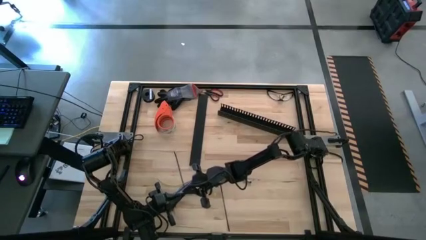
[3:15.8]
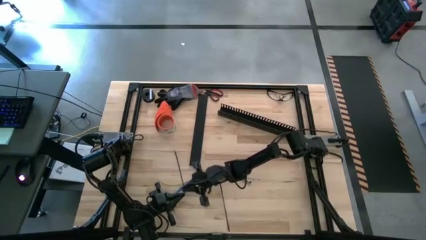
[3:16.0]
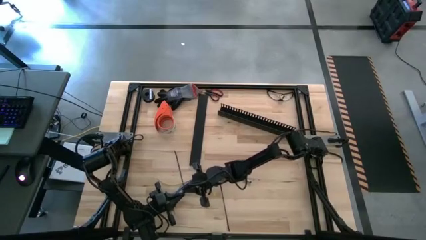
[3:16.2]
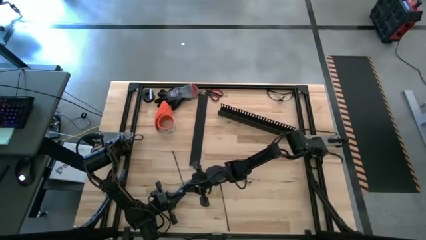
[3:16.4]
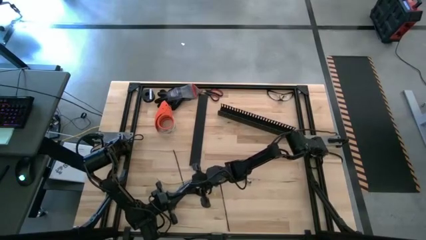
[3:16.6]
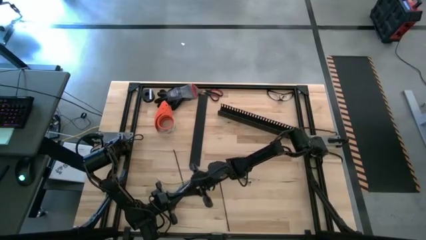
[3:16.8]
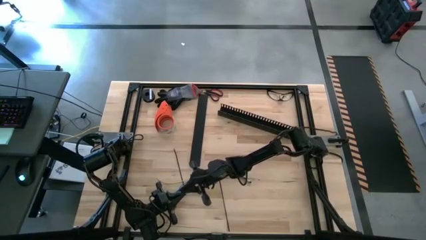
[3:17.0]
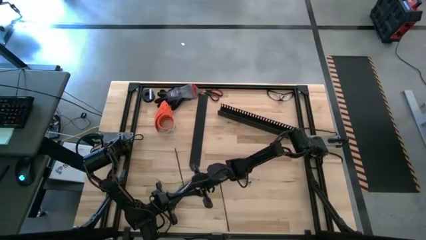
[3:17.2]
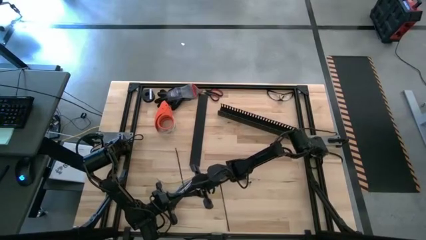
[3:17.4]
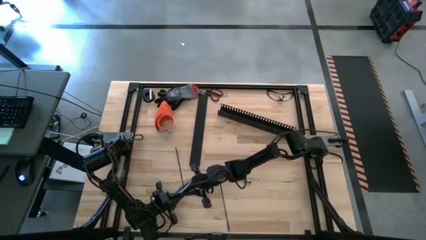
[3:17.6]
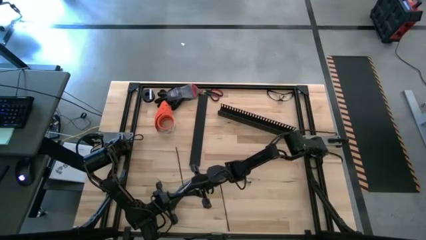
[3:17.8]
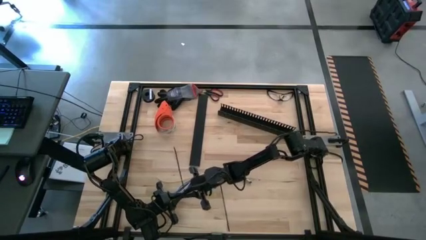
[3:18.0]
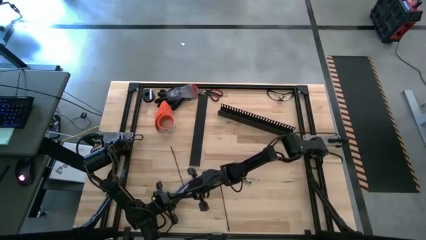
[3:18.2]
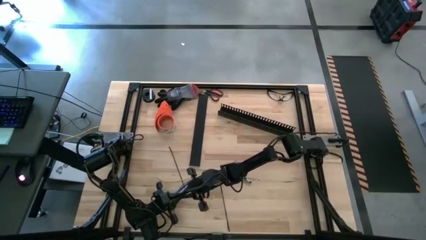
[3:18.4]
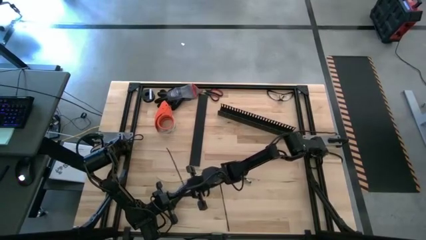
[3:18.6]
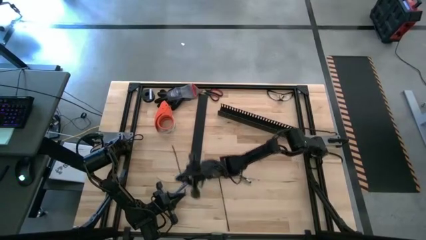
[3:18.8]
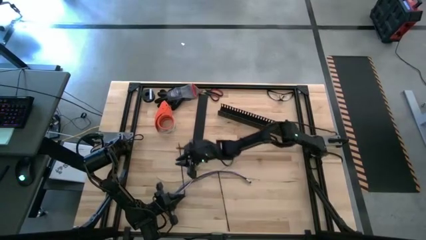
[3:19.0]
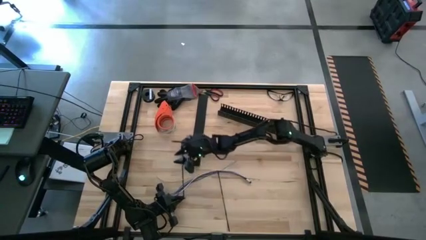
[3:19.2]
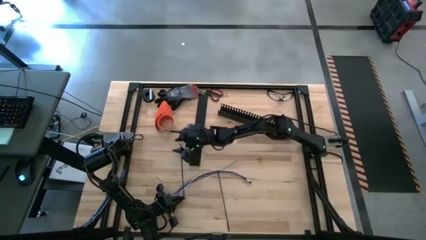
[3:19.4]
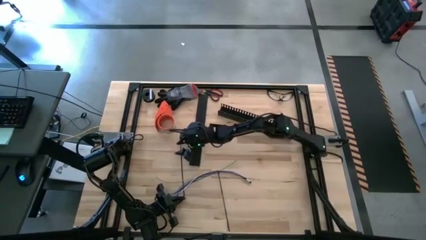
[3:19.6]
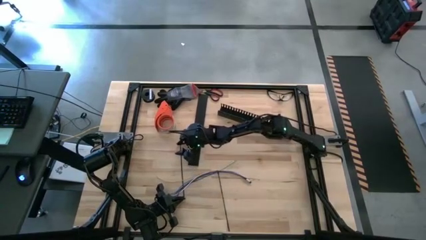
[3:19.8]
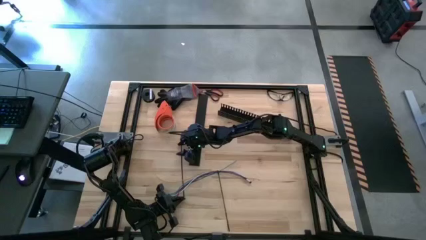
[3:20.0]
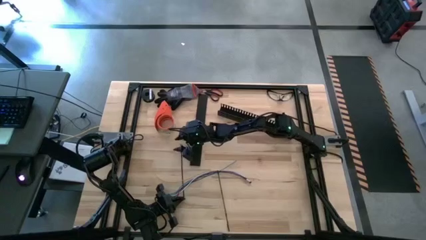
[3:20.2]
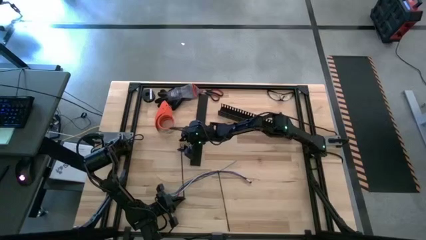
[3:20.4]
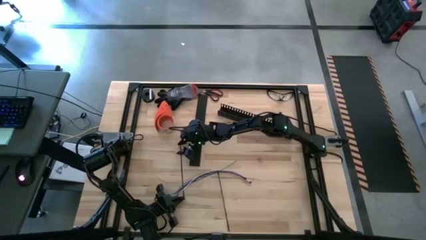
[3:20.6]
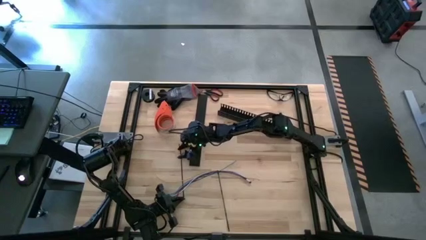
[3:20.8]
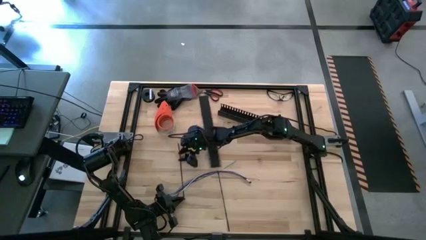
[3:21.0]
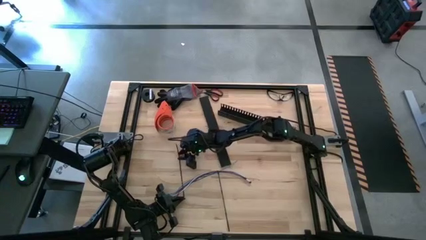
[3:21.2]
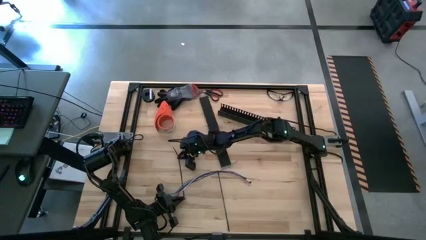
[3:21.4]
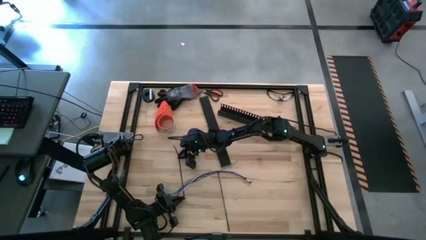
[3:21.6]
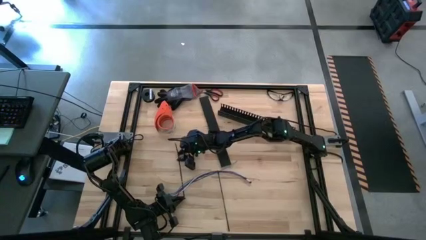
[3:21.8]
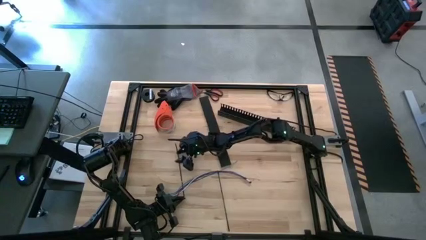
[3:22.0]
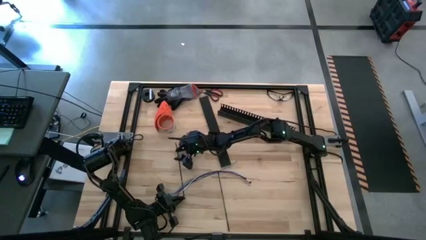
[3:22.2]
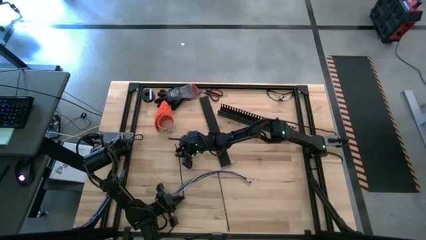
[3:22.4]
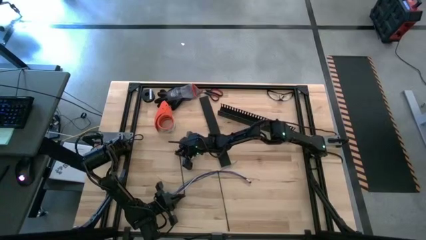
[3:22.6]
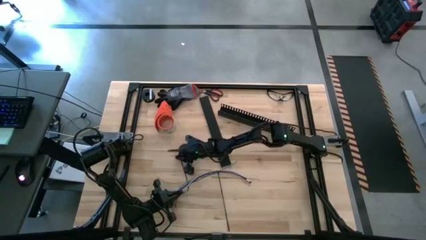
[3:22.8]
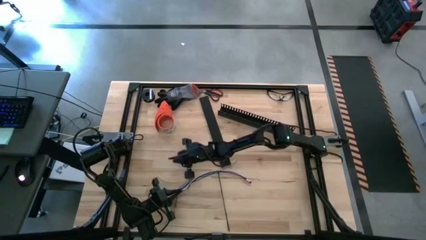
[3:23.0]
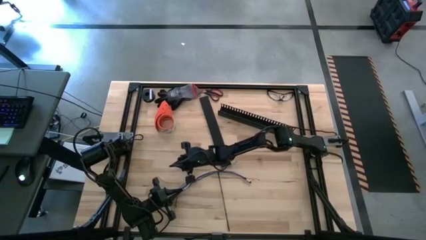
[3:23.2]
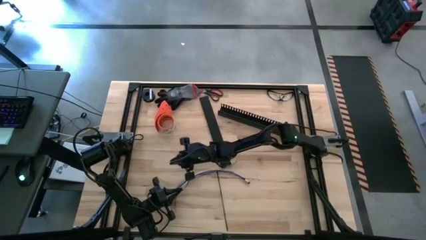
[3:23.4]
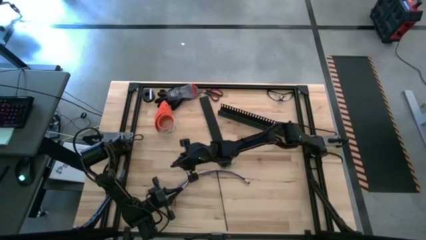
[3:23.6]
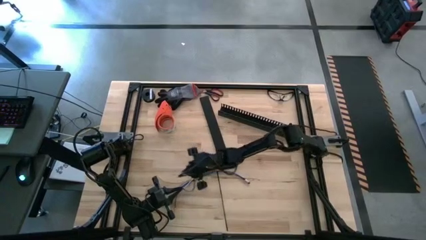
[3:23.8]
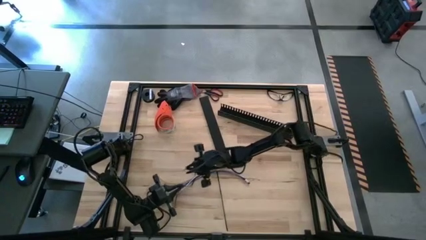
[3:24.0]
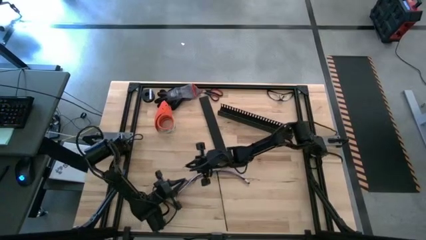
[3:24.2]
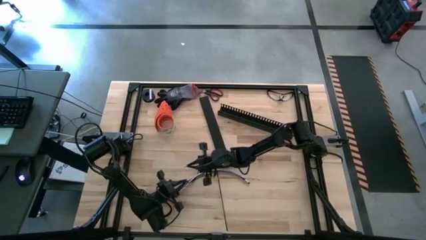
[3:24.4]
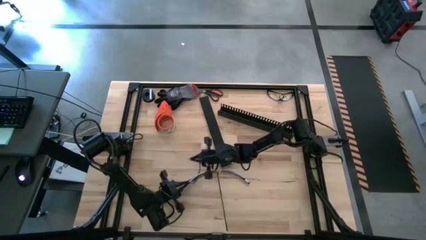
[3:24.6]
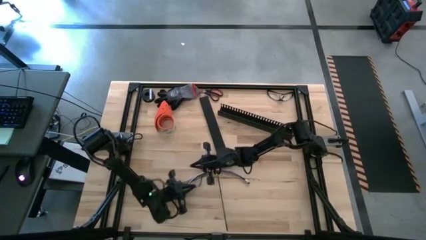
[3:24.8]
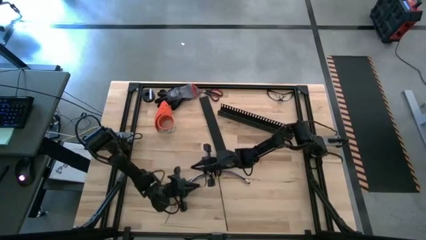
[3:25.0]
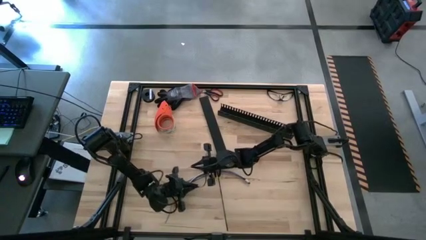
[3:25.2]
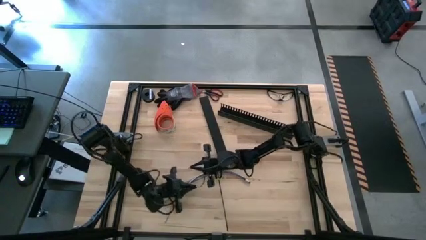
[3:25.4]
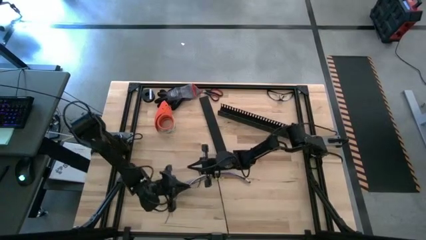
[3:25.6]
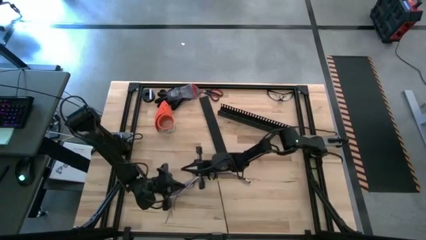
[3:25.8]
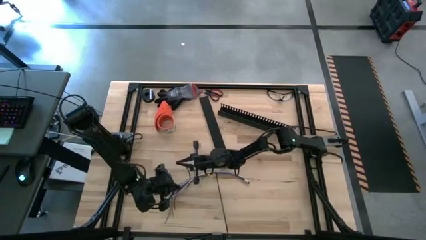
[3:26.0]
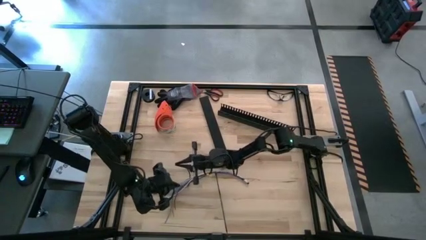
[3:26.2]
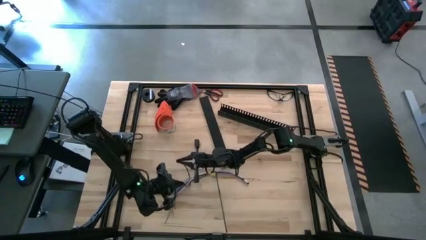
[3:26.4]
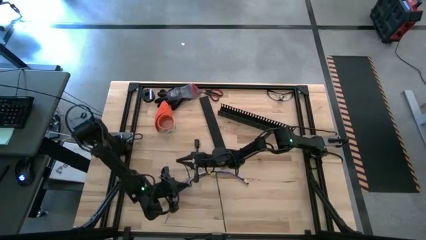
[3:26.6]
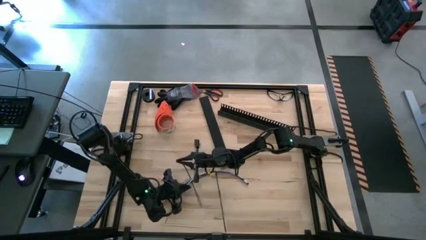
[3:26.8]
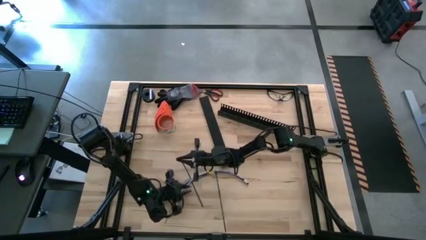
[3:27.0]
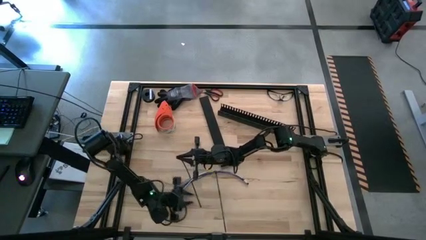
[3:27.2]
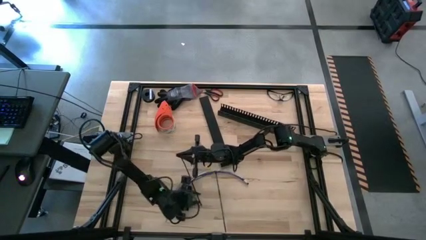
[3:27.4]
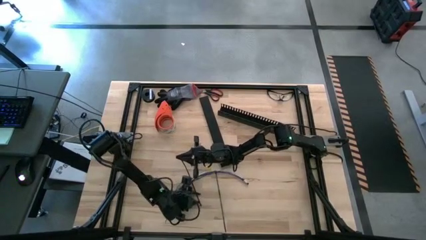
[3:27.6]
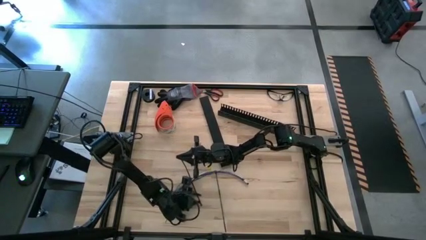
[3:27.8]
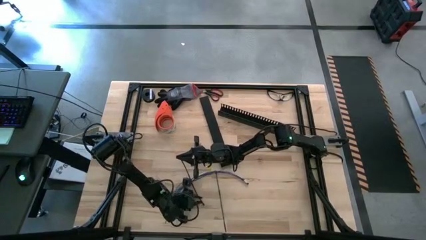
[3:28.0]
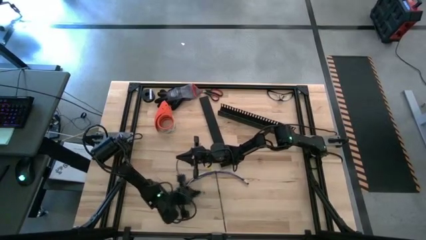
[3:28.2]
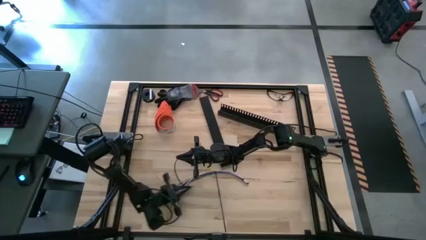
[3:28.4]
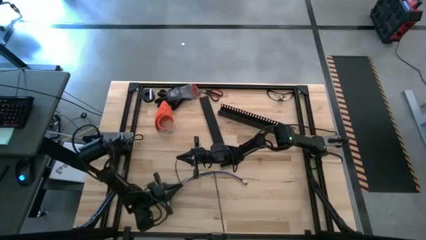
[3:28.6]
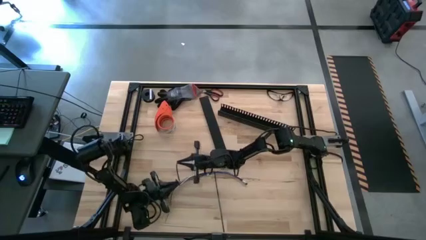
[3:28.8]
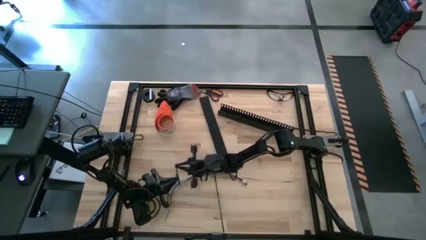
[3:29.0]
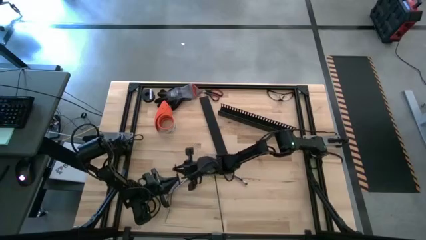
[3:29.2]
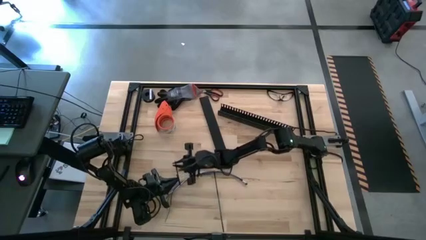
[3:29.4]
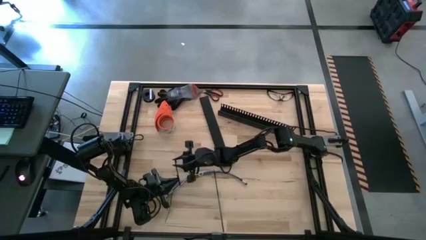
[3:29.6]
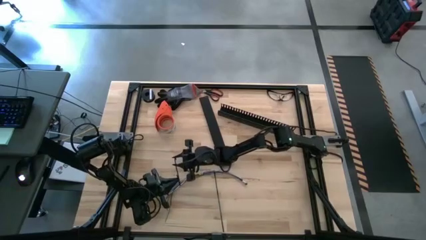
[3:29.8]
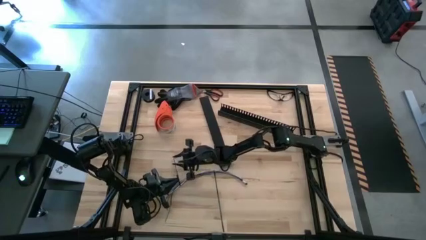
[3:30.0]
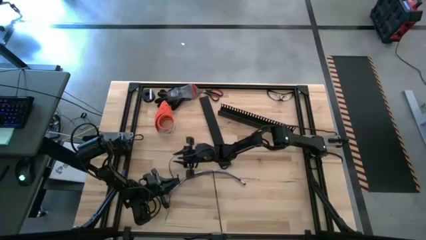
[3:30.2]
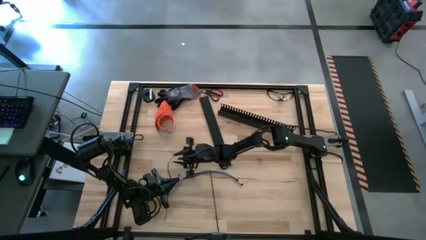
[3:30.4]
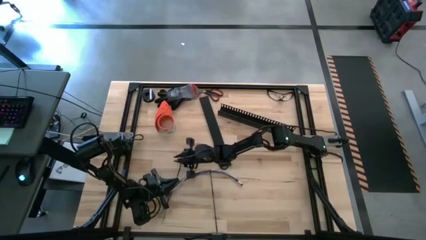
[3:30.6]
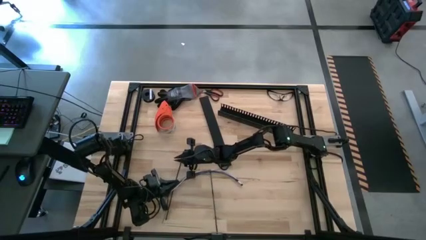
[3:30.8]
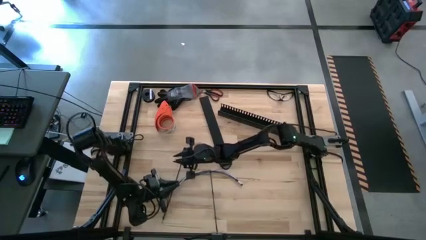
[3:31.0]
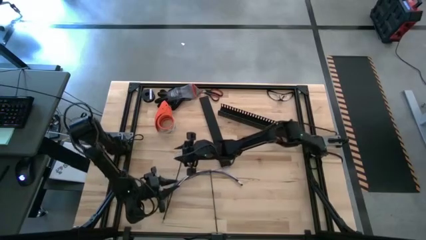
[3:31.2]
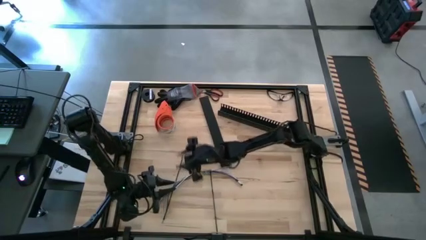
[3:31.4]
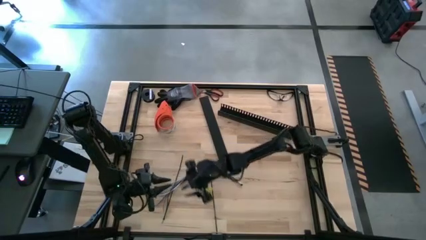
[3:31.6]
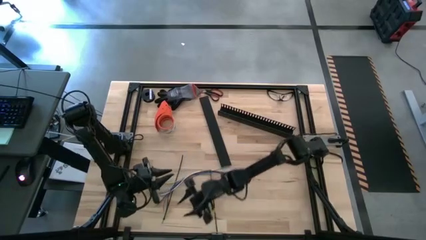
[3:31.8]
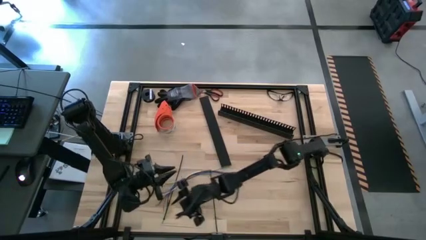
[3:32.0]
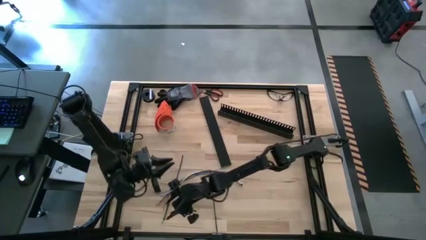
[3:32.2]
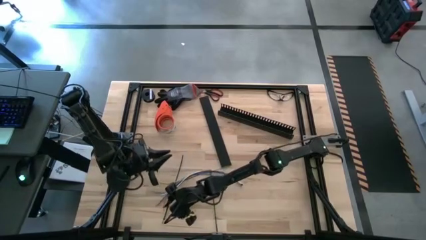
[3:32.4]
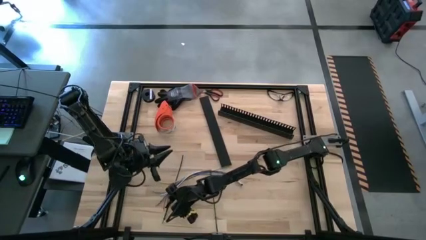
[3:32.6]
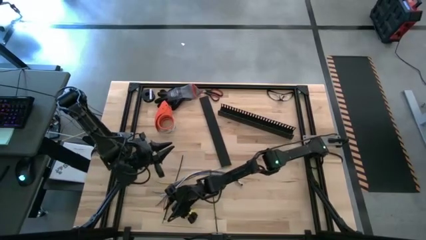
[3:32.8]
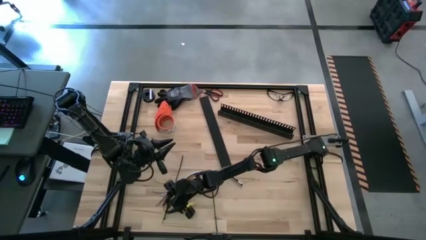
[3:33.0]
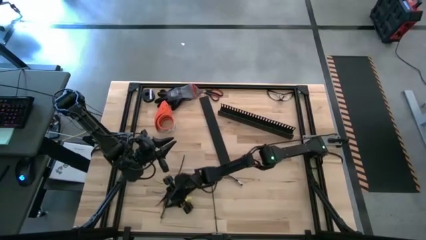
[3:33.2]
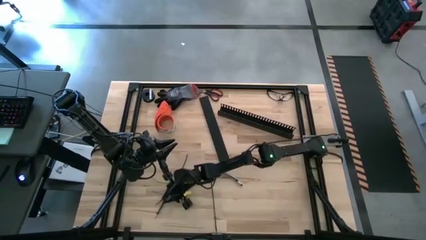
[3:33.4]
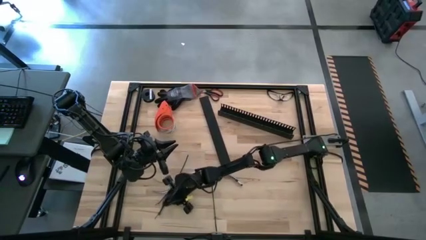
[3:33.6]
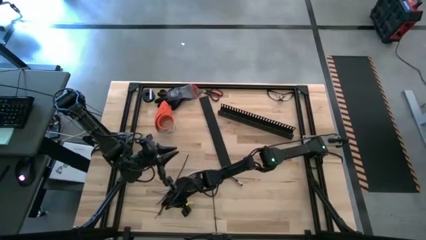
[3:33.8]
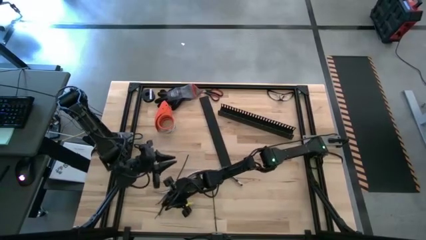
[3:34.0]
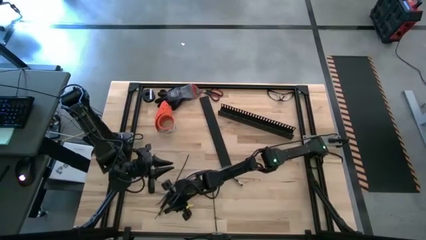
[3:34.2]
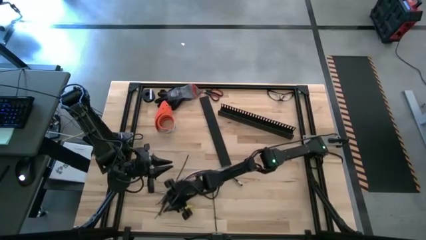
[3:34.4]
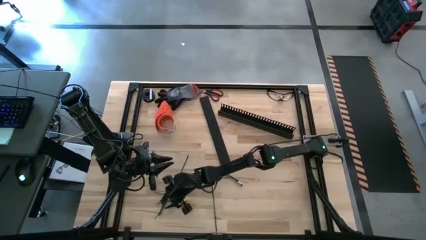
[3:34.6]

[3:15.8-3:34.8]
Task: Ziptie cables
Wrap the black zip tie on the cables
